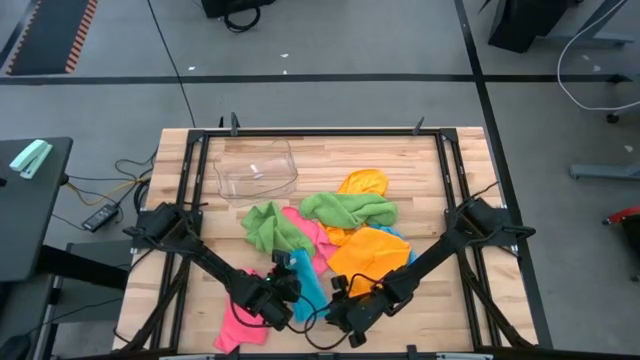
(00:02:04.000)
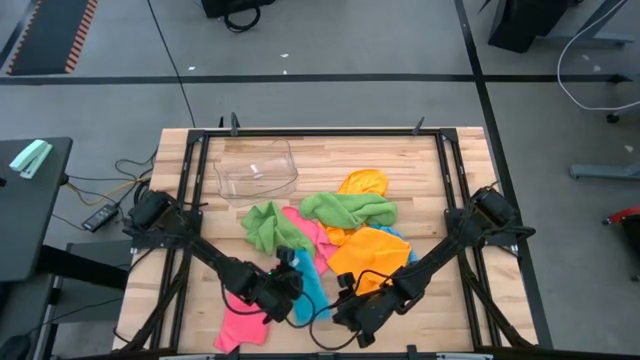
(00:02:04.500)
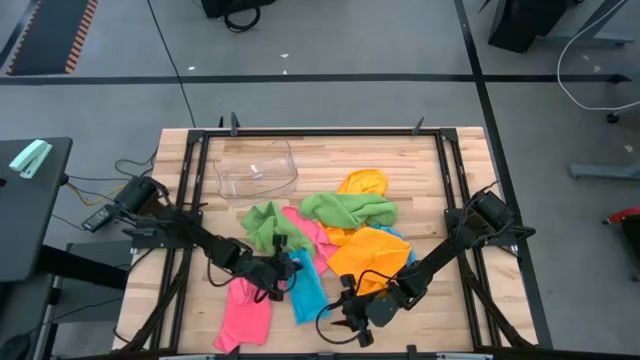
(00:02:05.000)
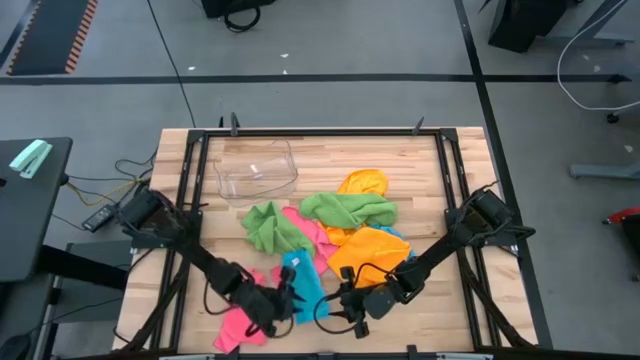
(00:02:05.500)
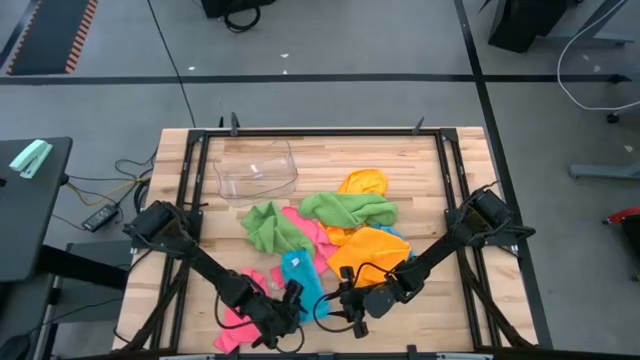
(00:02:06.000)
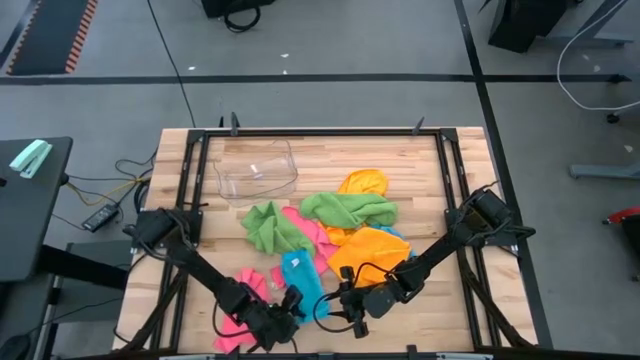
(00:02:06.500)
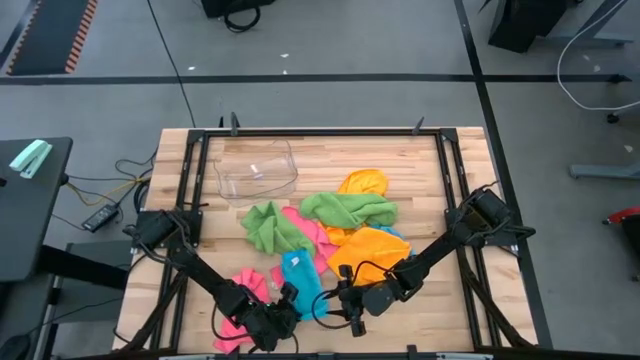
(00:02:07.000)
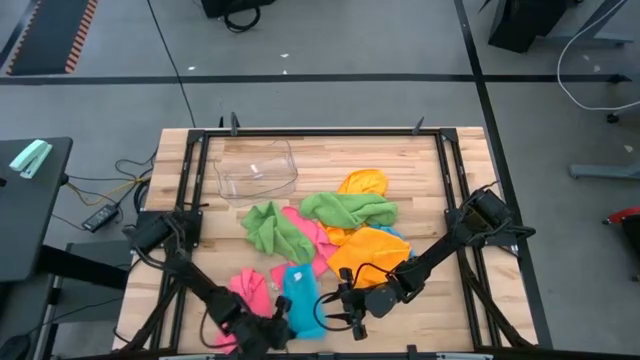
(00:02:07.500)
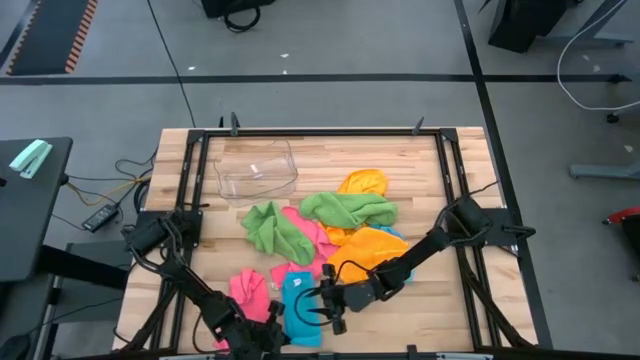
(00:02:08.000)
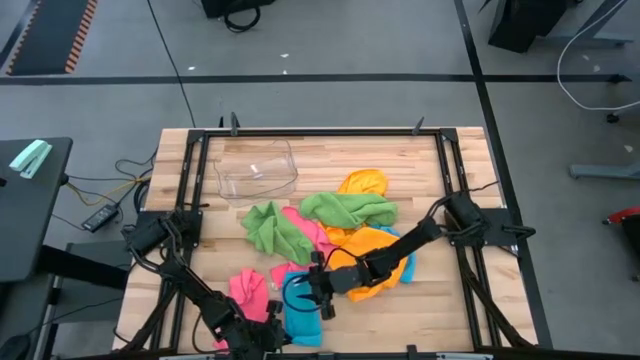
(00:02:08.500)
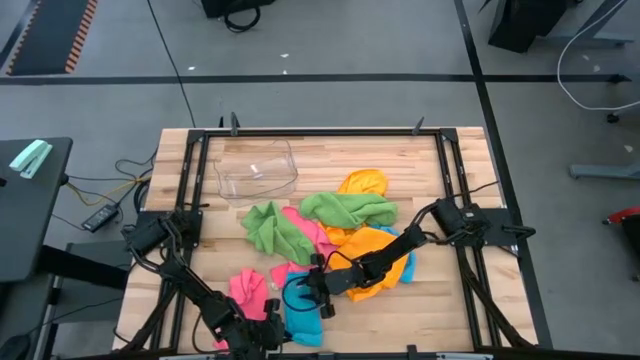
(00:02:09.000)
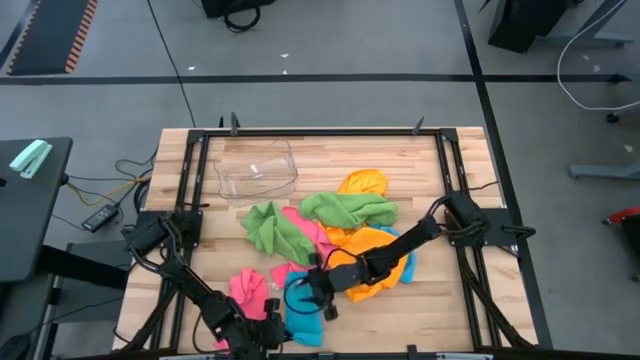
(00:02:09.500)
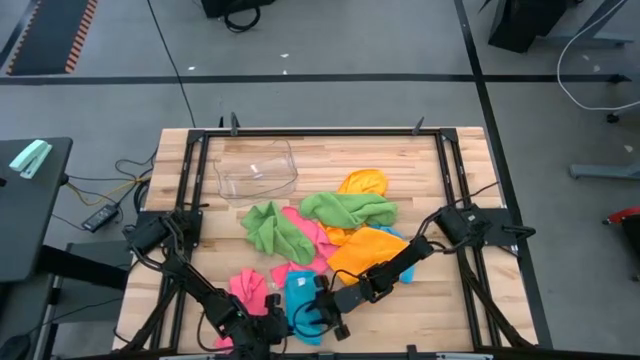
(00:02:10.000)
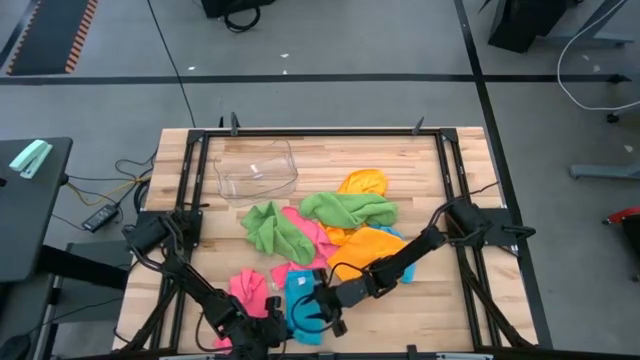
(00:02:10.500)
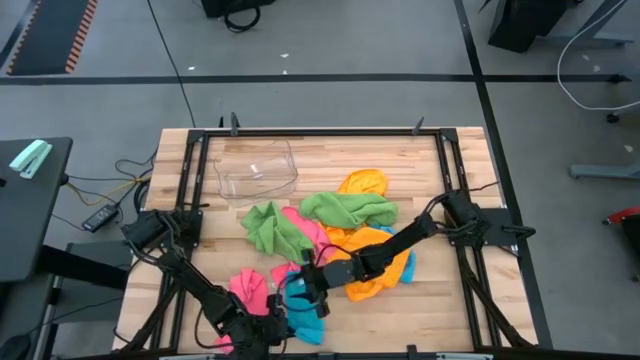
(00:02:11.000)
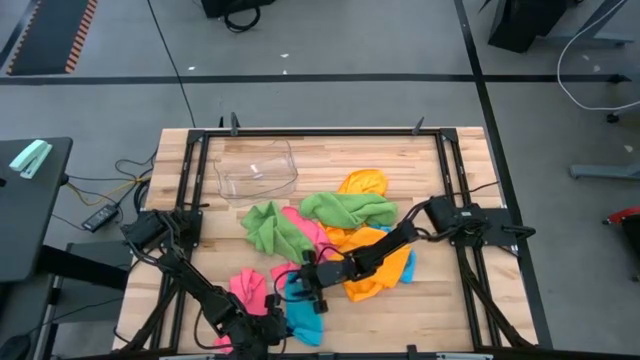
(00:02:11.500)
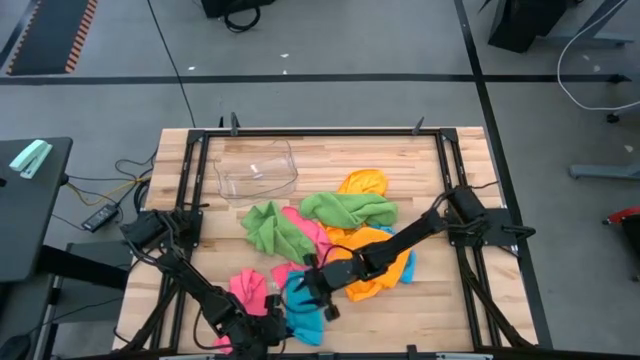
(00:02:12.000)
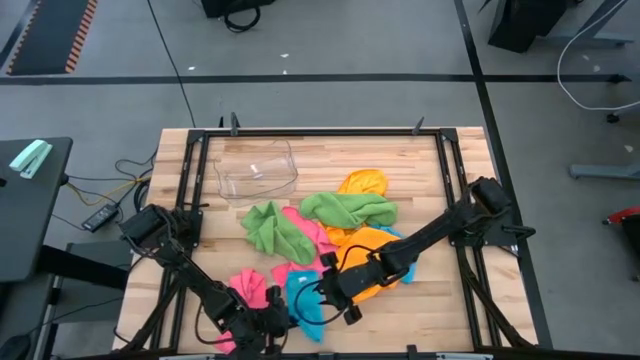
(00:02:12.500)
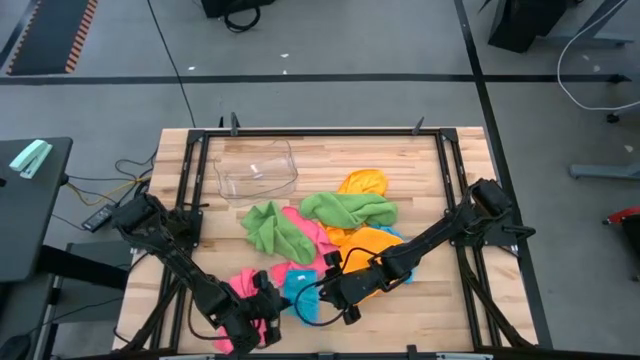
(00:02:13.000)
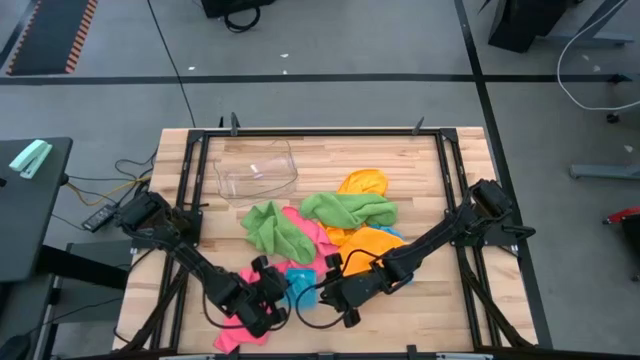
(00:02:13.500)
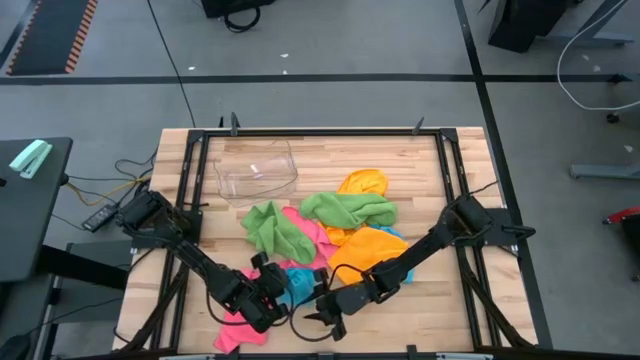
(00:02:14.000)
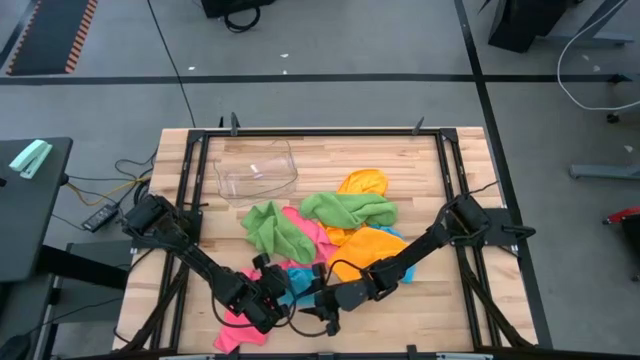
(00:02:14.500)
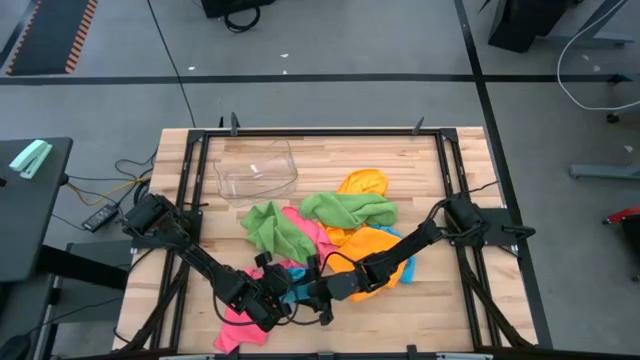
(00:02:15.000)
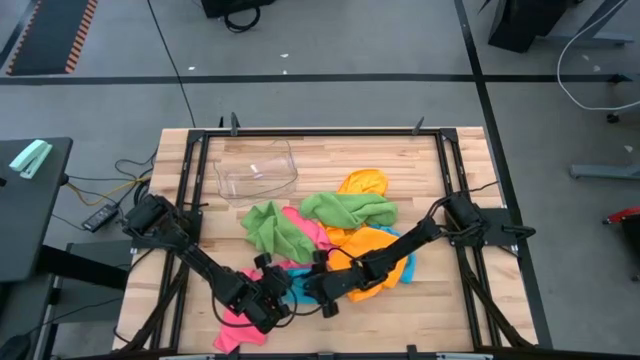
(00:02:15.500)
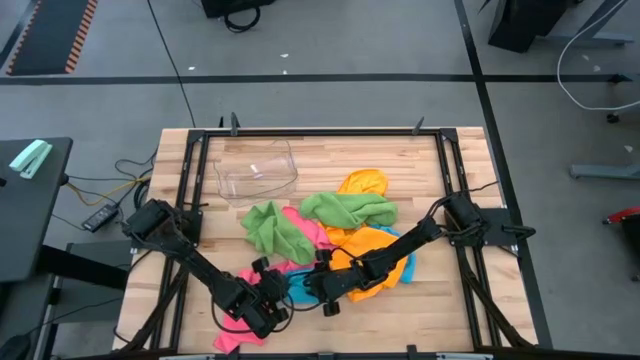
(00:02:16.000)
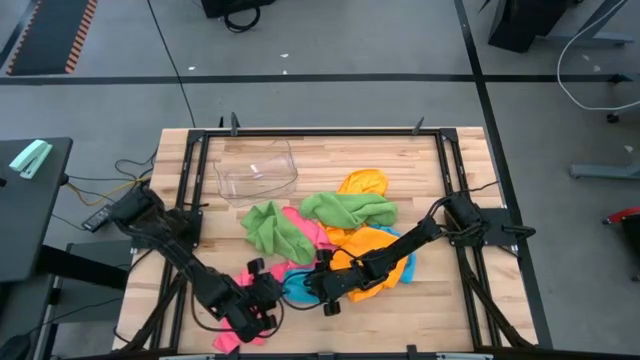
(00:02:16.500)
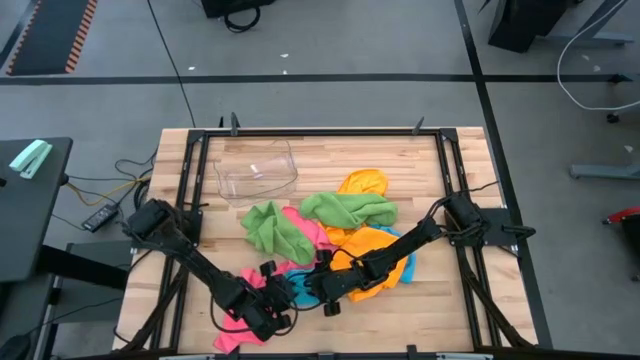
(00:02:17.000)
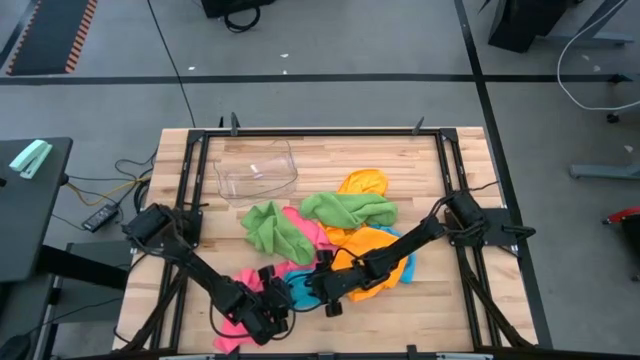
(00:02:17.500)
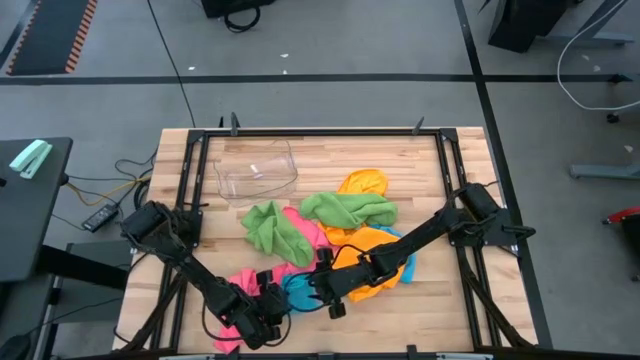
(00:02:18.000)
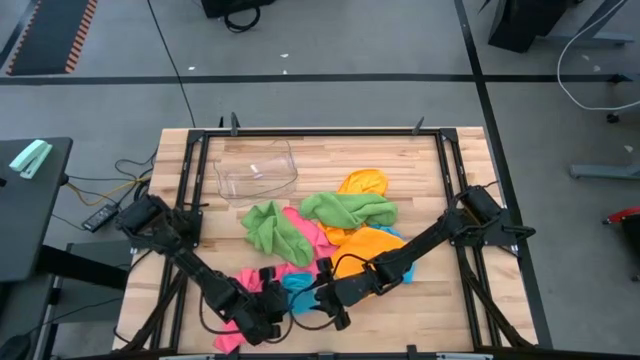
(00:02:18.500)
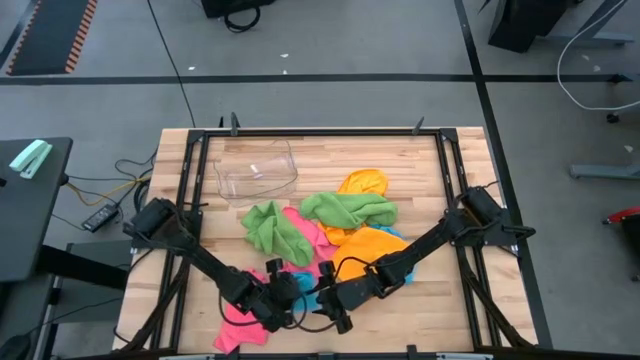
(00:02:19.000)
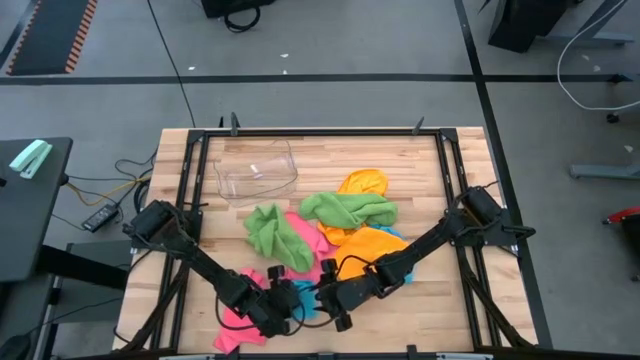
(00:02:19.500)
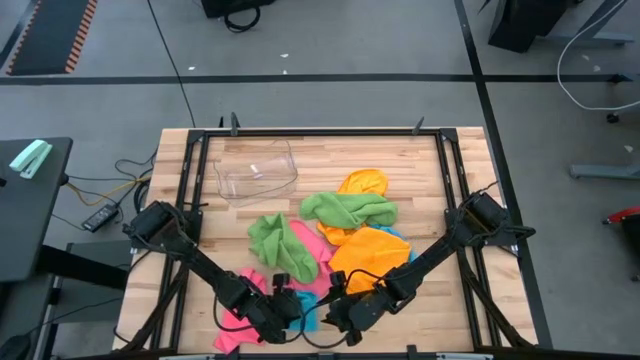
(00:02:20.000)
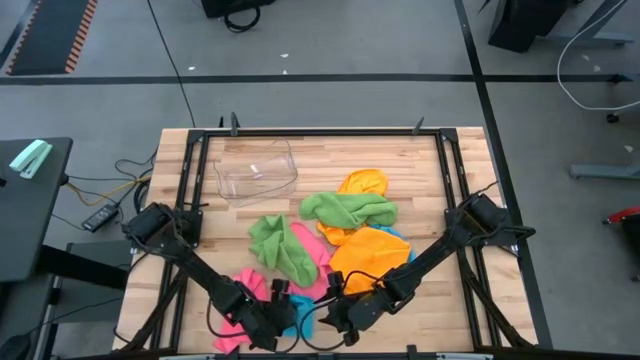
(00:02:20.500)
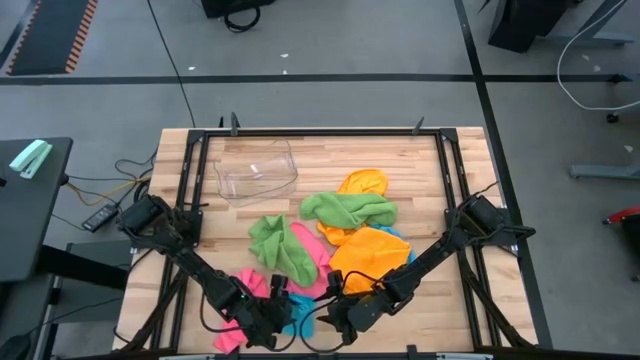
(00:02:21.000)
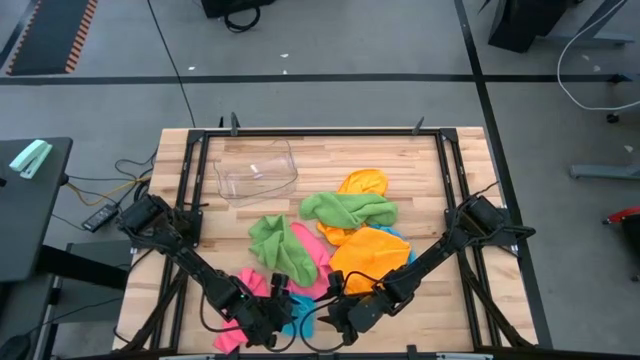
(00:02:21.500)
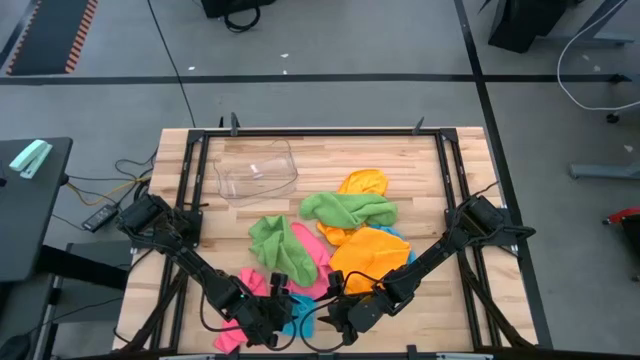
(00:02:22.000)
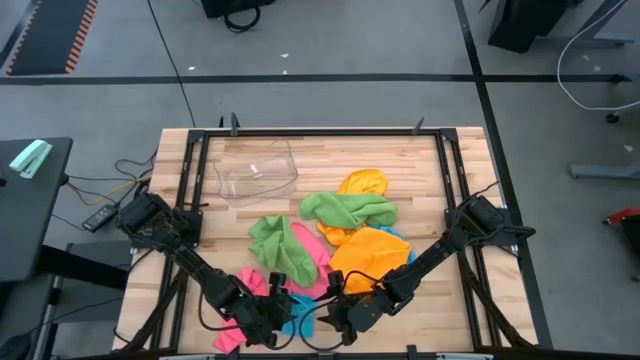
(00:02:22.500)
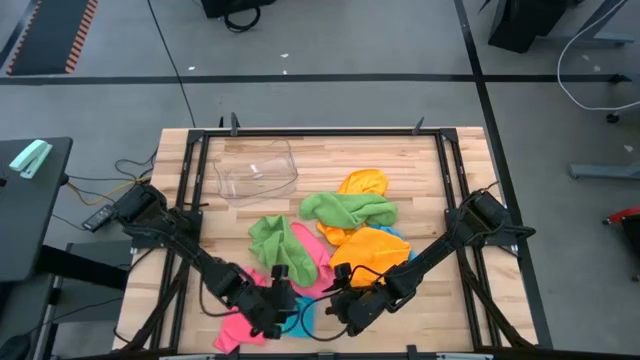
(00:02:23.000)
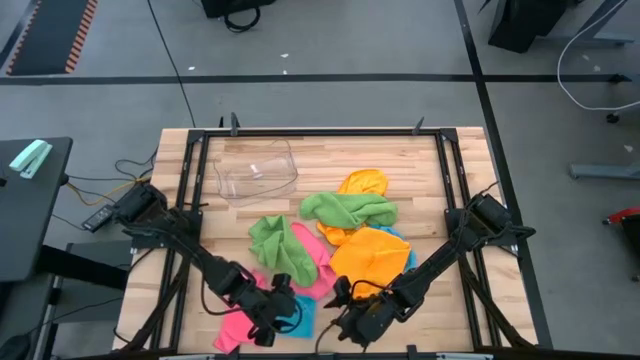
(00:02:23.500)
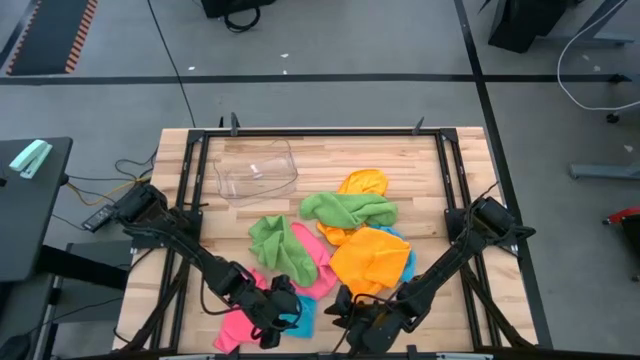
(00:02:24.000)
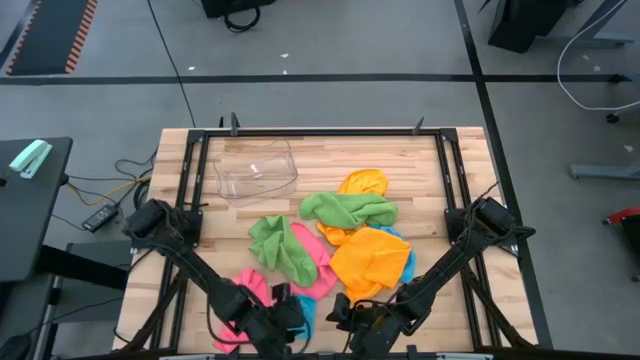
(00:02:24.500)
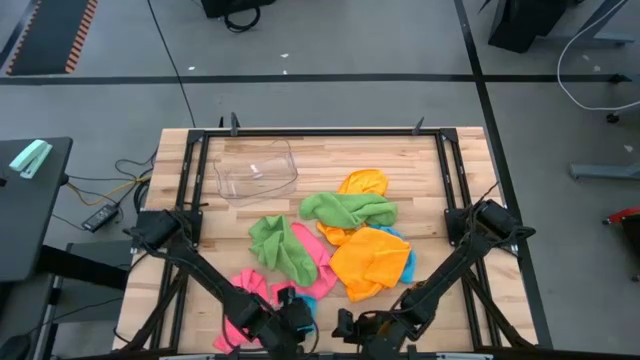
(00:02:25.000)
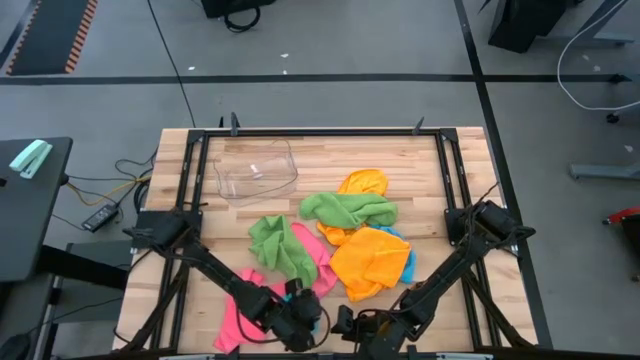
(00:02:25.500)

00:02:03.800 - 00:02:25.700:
Task: Fold microfiber towels
Fold the left blue microfiber towel
